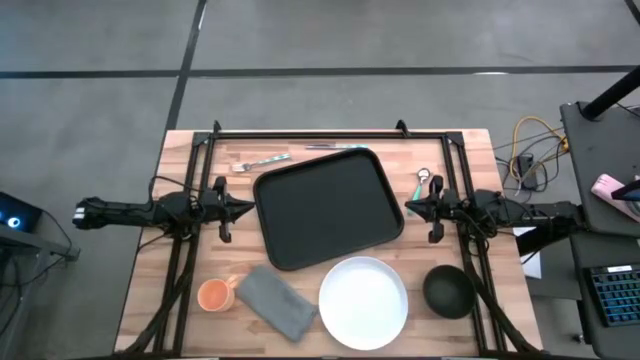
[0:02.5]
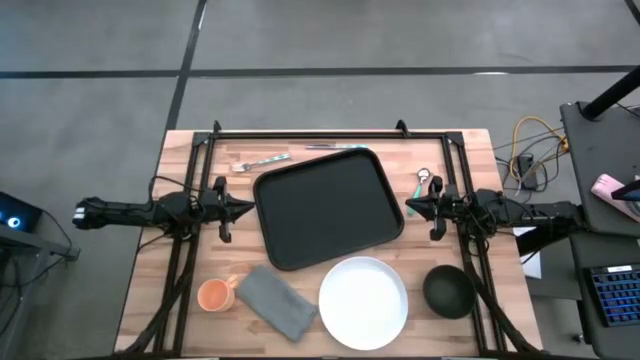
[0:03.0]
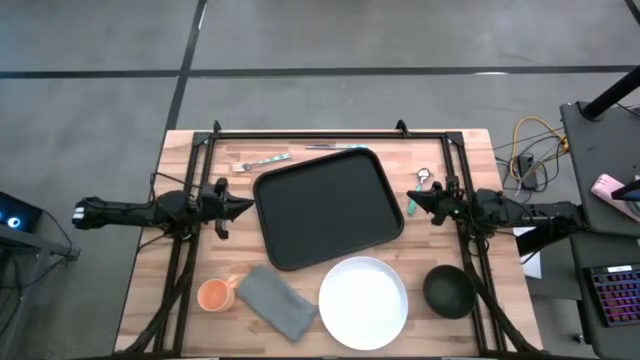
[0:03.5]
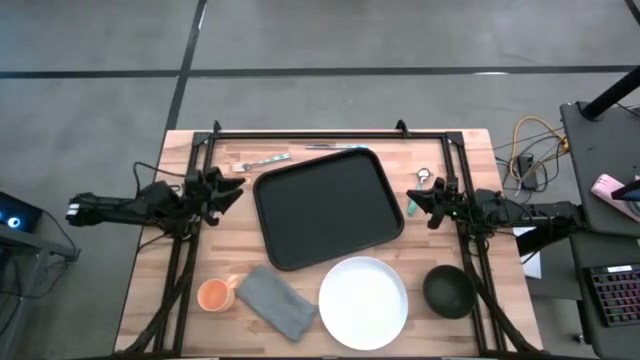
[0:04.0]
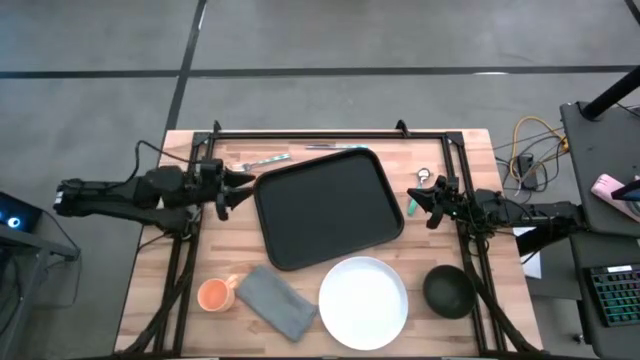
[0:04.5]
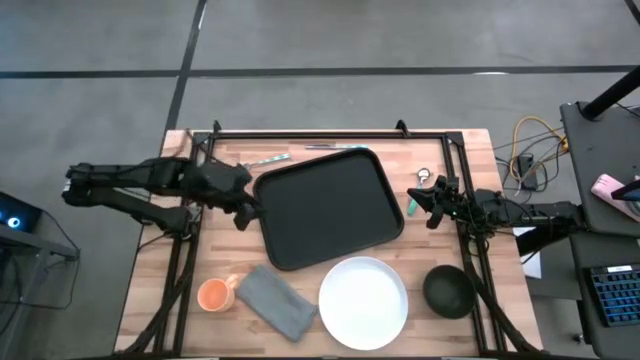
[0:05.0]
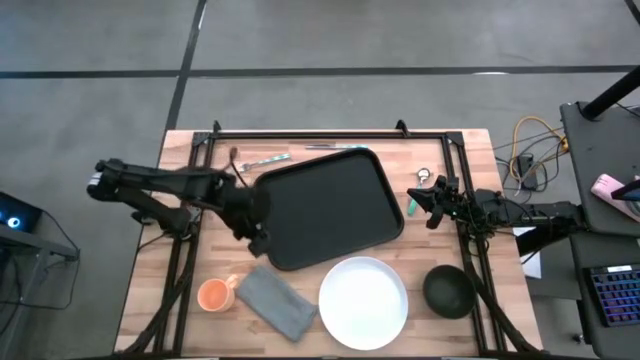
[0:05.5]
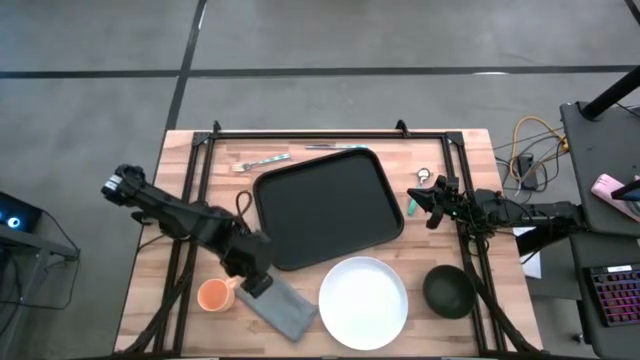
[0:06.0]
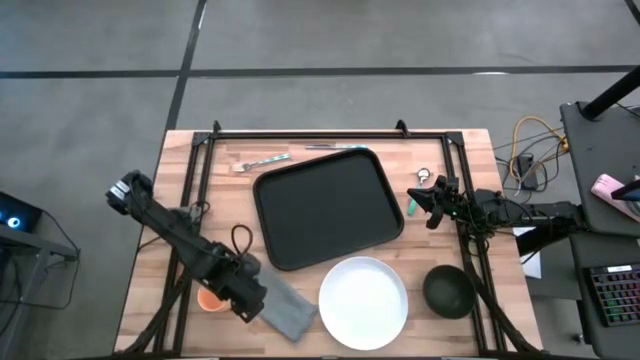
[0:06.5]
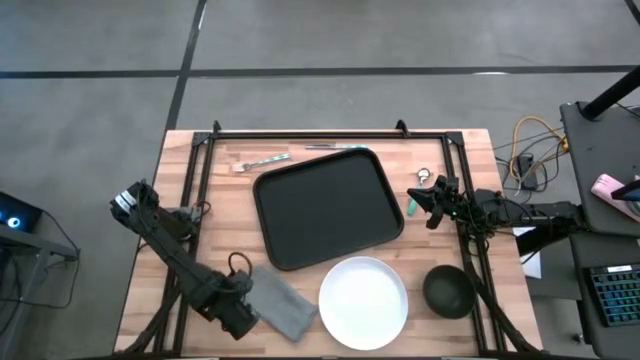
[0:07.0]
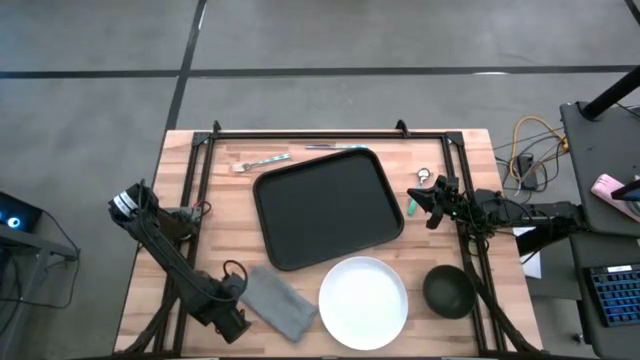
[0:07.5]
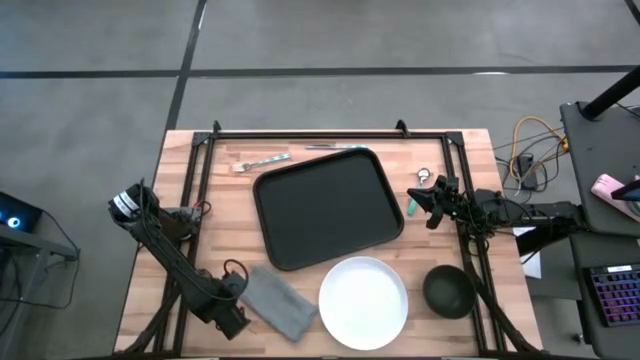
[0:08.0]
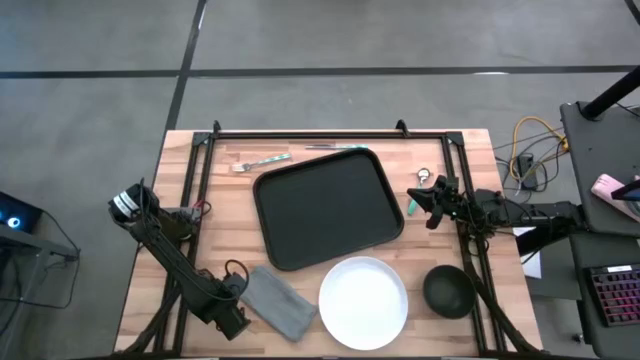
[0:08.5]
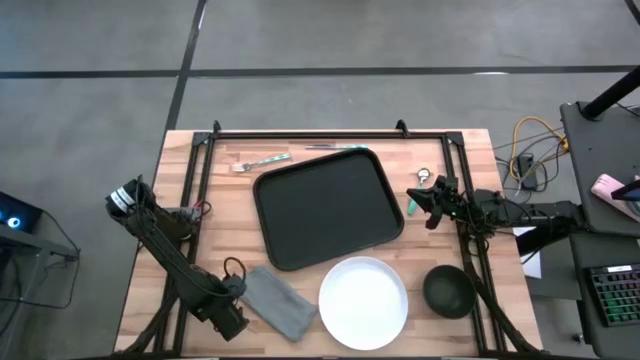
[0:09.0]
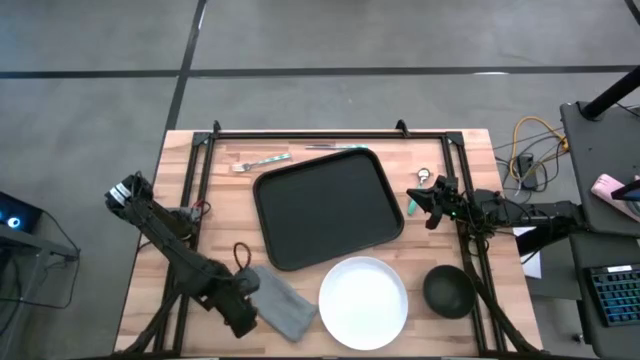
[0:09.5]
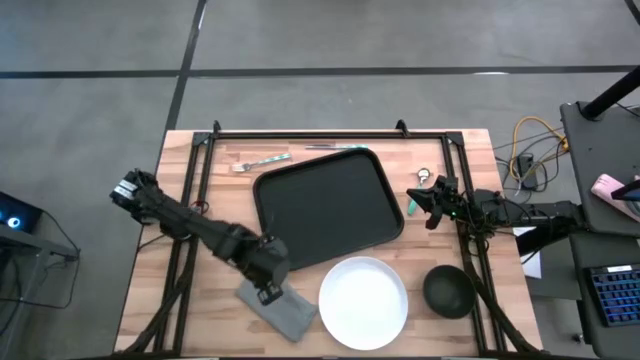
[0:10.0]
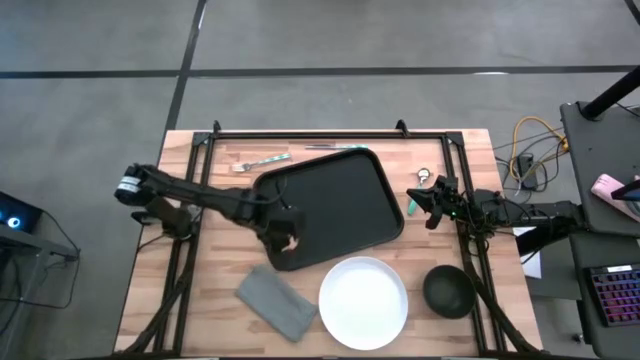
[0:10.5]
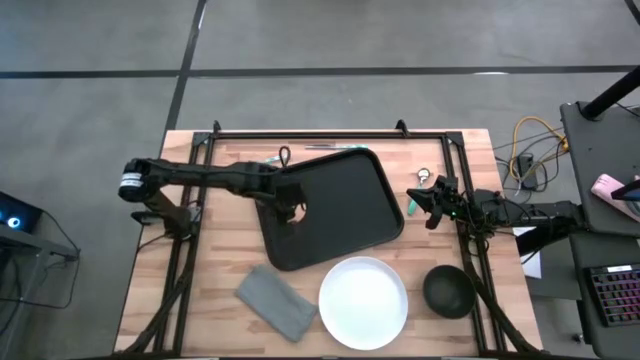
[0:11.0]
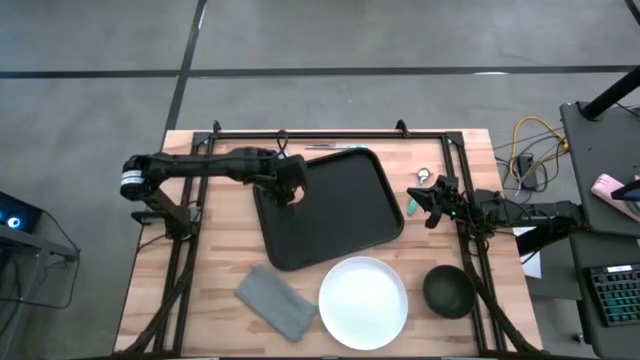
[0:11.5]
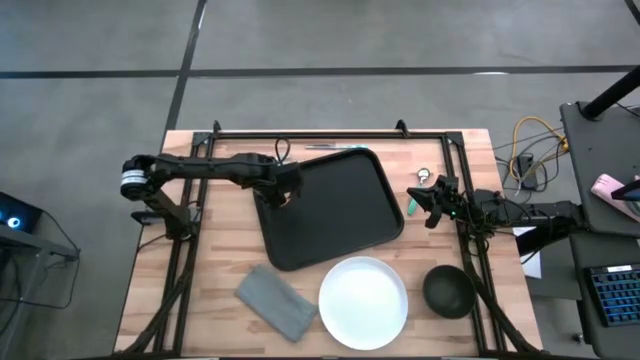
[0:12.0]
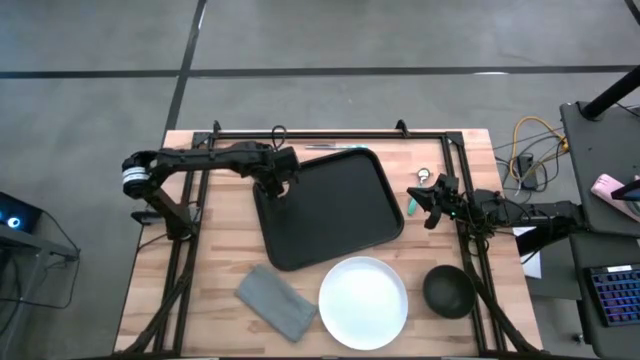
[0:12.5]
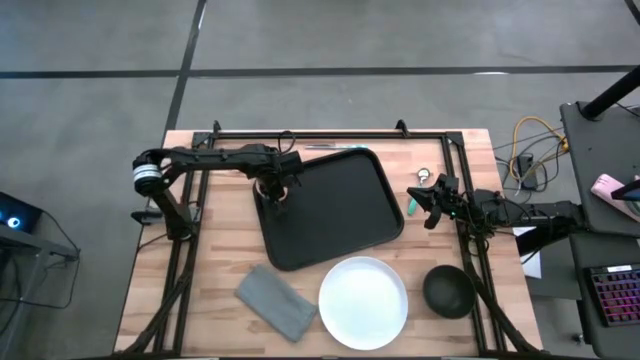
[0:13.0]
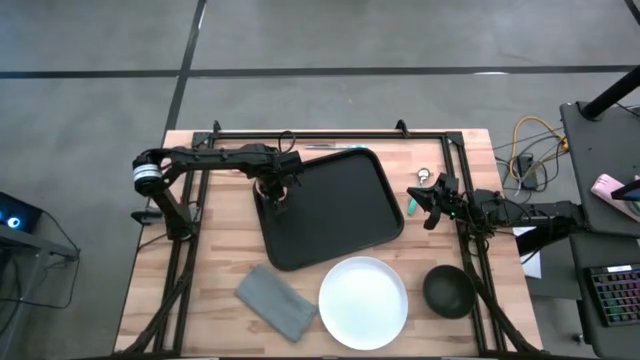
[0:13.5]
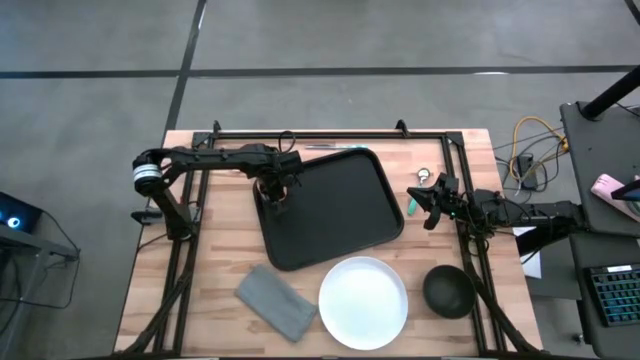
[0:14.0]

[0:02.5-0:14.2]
Task: Set up tray
Put the light orange mug on the black tray

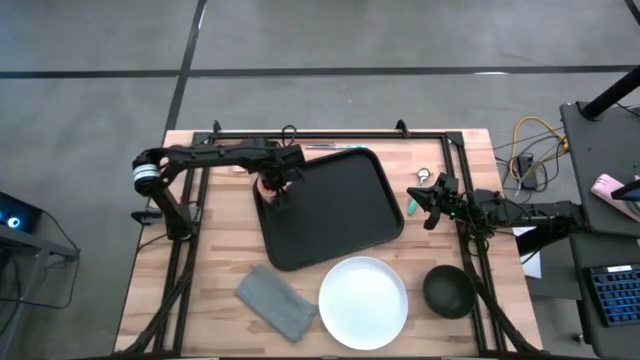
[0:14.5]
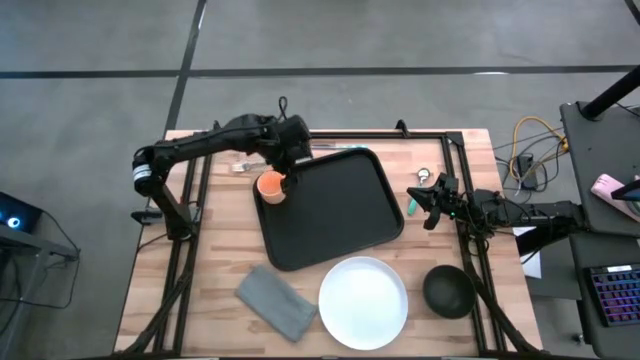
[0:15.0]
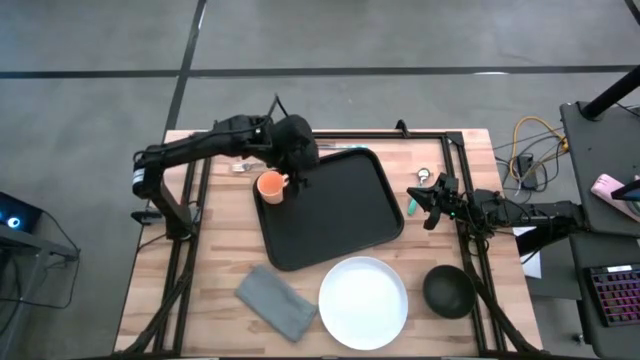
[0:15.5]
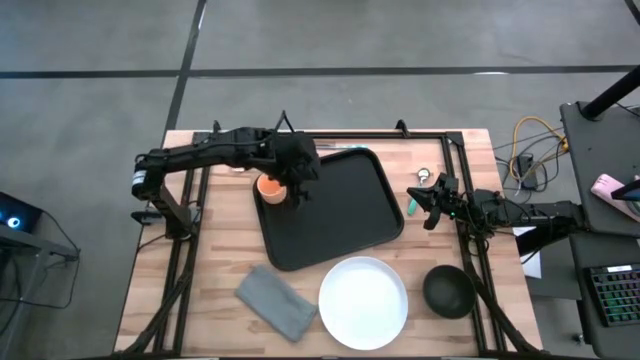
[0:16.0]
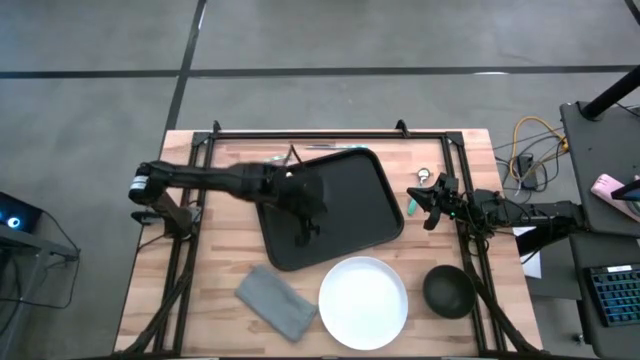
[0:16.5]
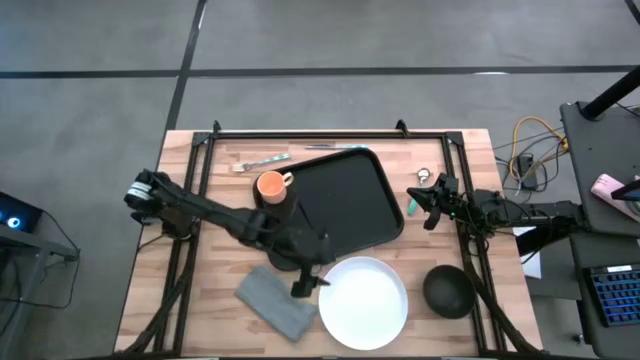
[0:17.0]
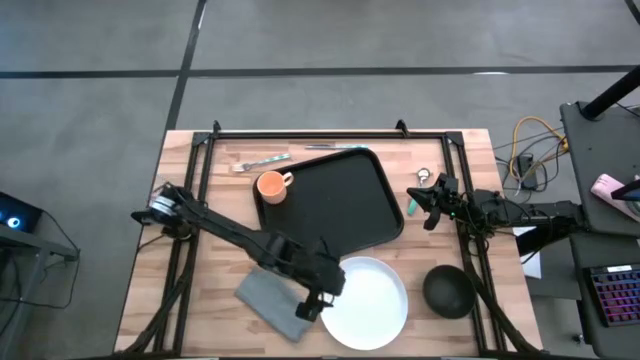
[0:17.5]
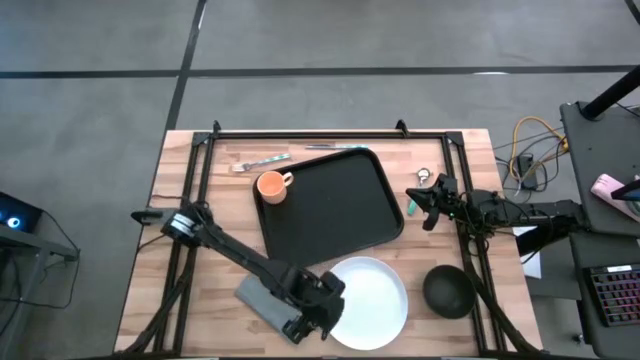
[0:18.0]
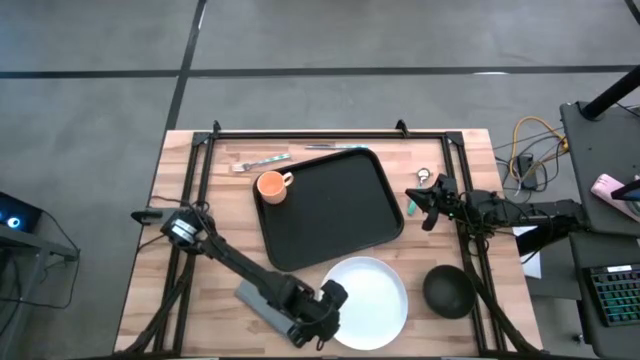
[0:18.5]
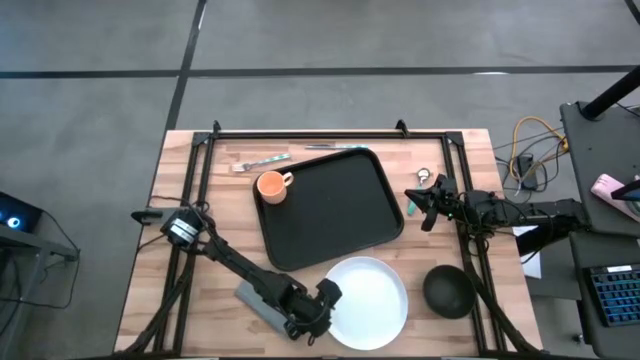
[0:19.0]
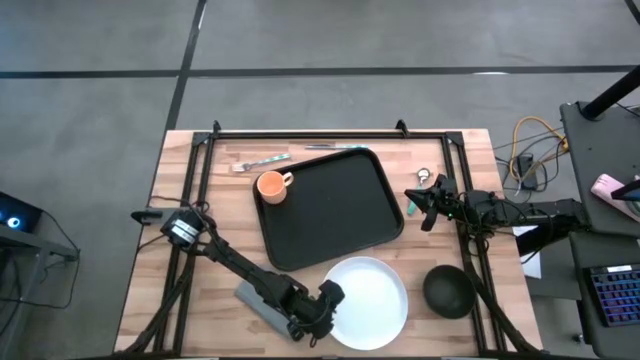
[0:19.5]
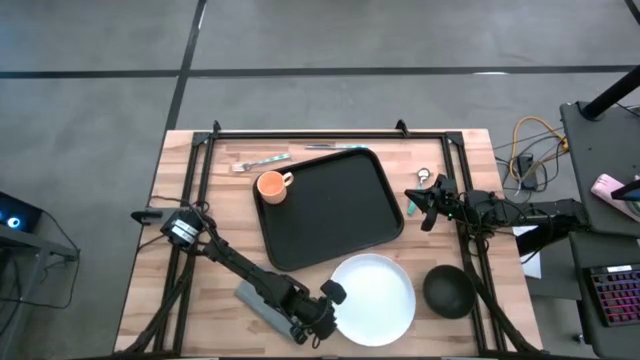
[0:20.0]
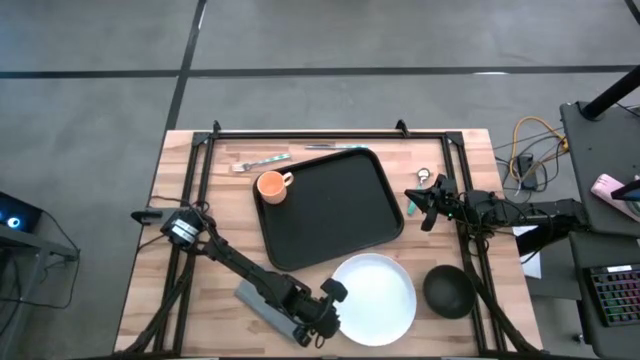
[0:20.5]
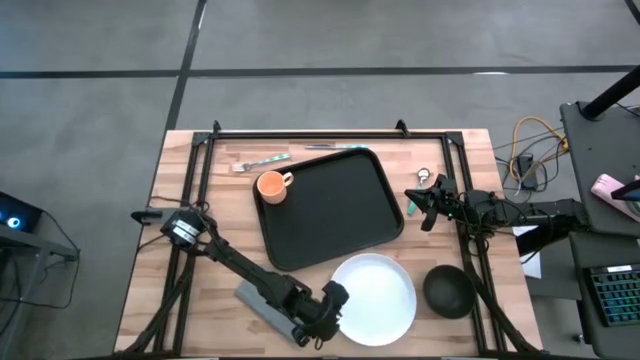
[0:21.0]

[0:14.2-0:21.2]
Put the white plate on the black tray

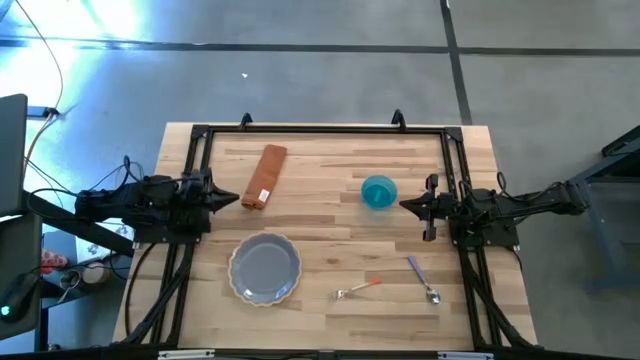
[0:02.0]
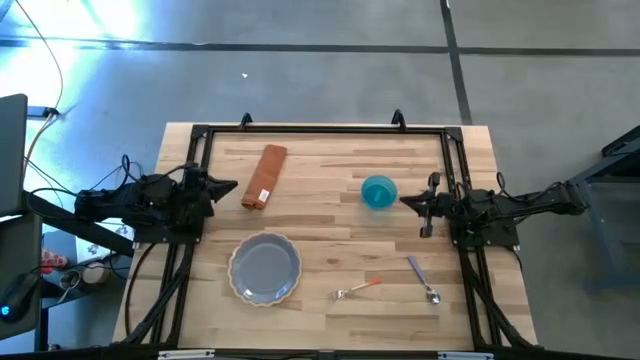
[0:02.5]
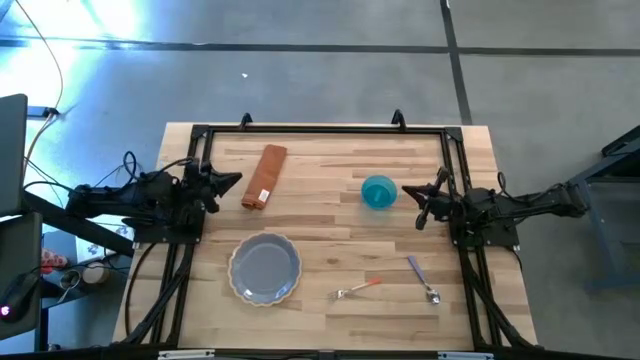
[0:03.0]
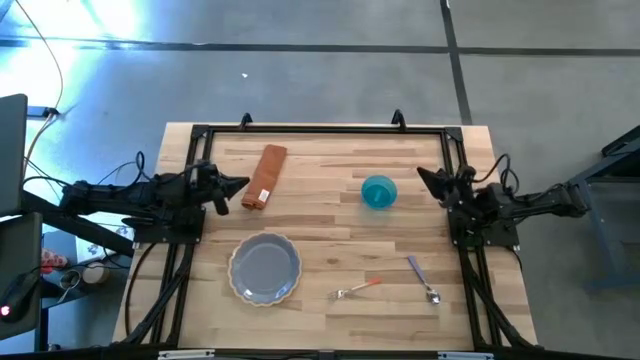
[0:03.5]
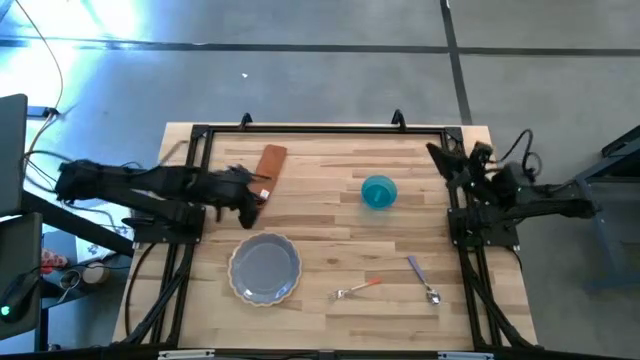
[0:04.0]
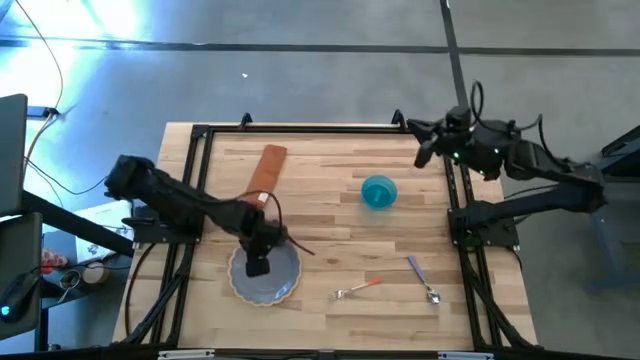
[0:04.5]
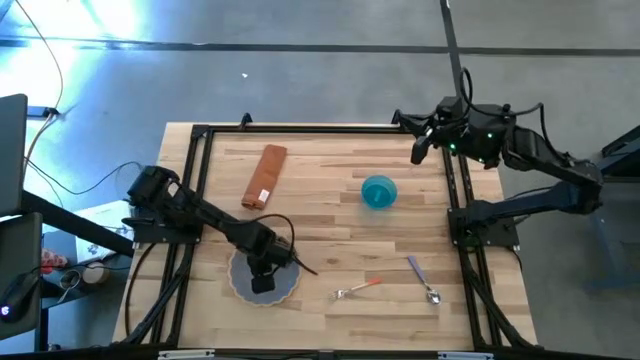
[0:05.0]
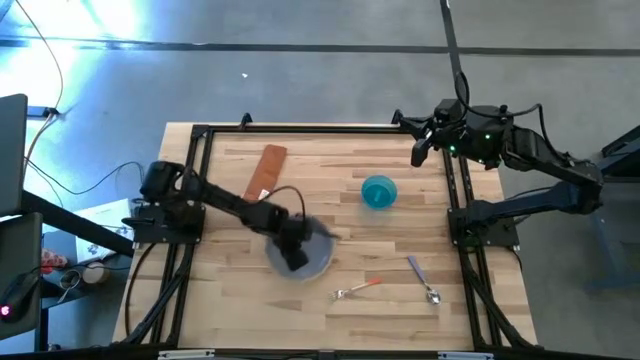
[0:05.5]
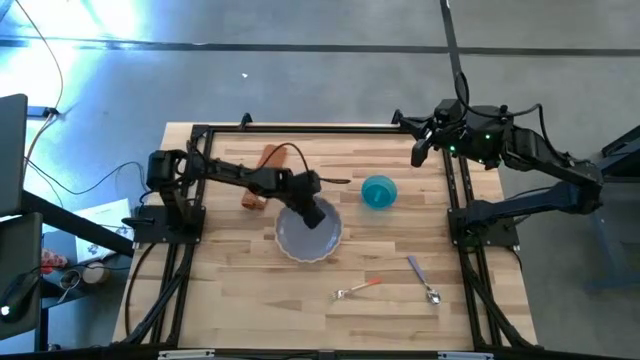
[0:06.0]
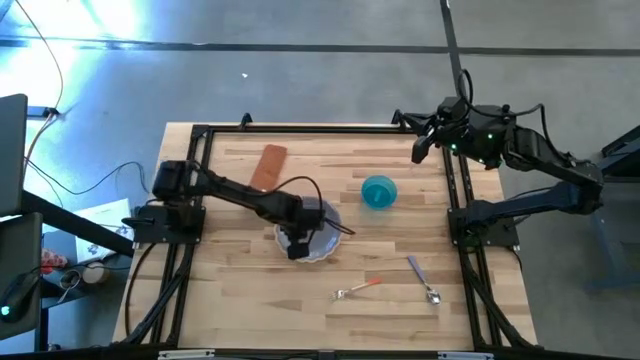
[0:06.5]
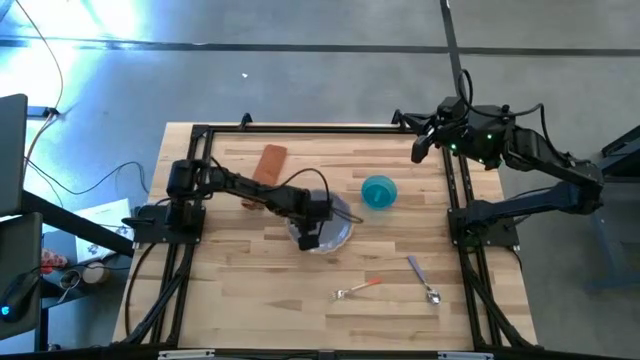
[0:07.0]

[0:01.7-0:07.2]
Task: Set table place
Move the purple plate to the center of the table
